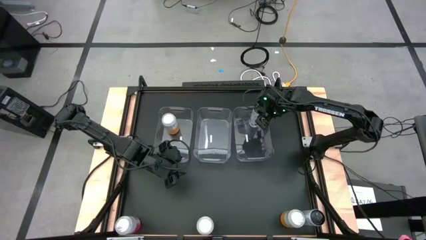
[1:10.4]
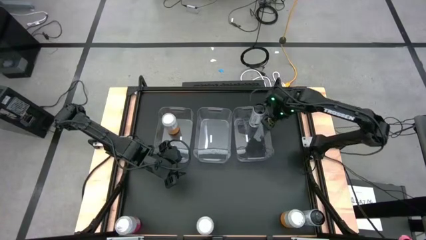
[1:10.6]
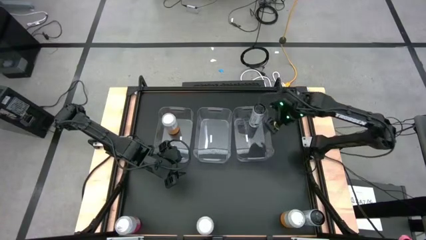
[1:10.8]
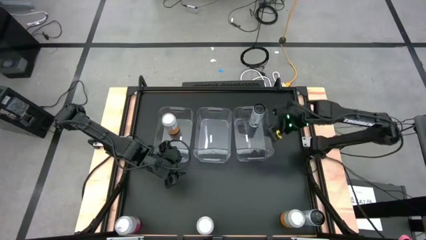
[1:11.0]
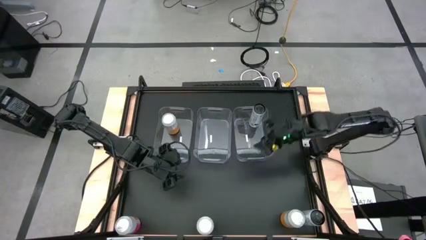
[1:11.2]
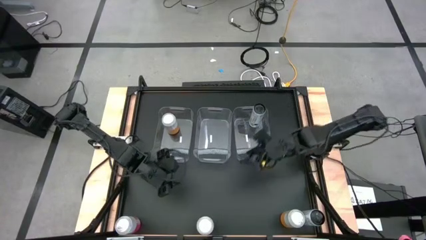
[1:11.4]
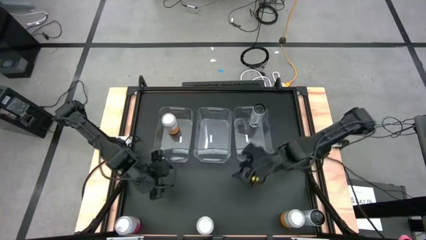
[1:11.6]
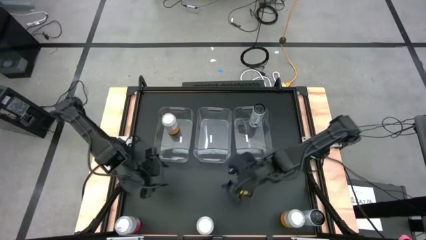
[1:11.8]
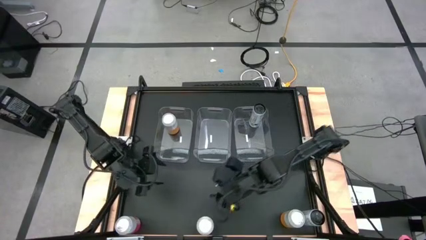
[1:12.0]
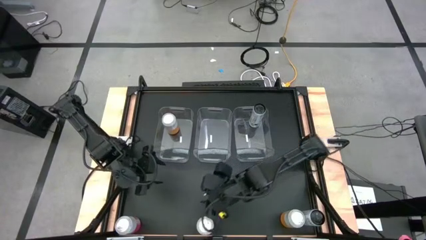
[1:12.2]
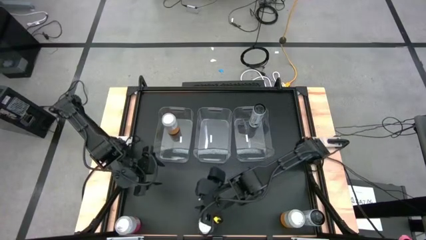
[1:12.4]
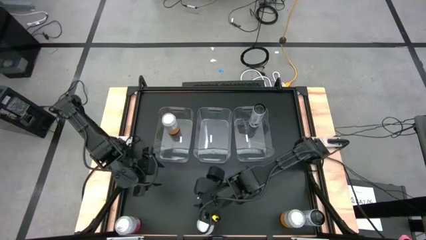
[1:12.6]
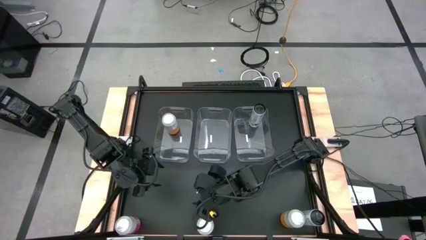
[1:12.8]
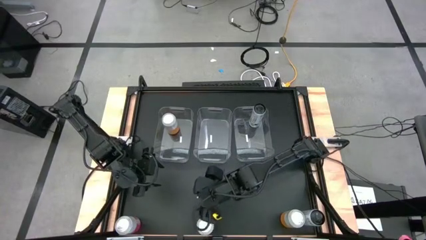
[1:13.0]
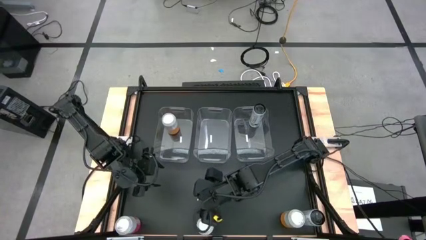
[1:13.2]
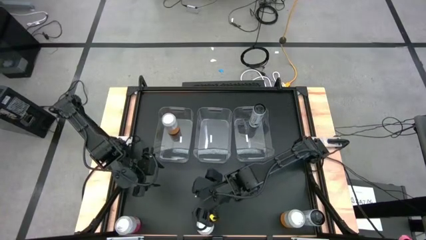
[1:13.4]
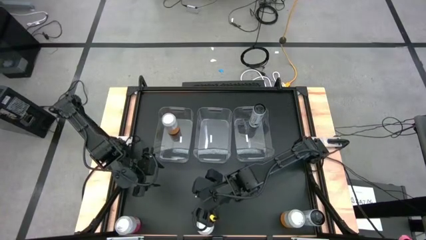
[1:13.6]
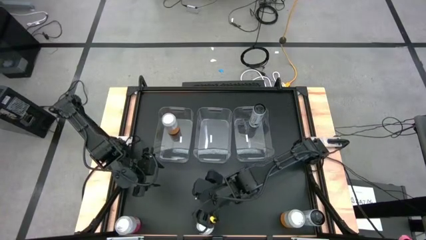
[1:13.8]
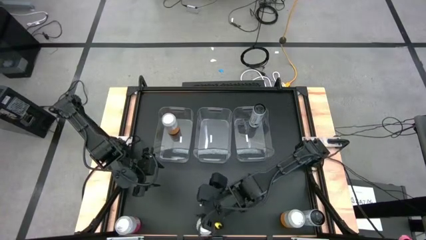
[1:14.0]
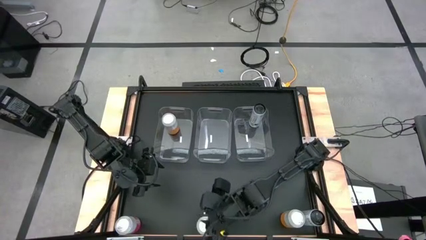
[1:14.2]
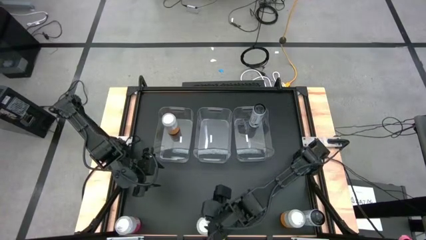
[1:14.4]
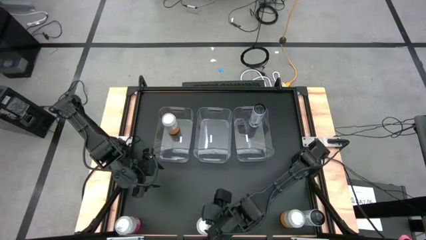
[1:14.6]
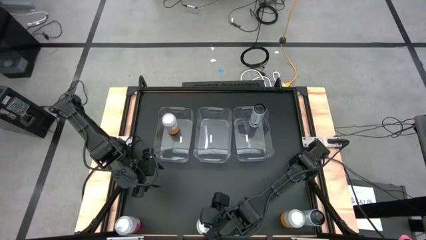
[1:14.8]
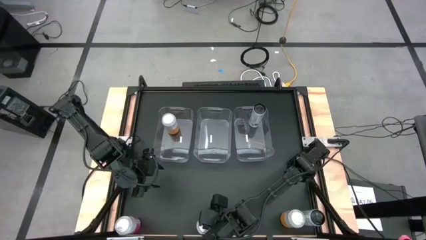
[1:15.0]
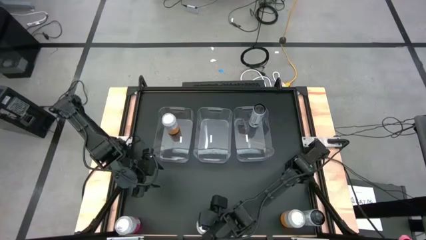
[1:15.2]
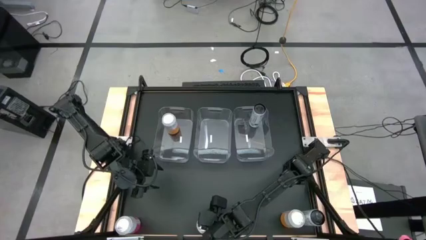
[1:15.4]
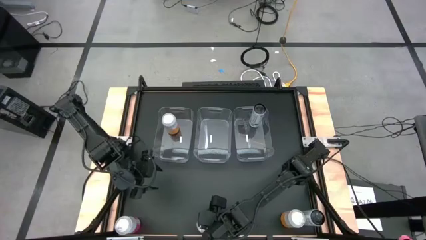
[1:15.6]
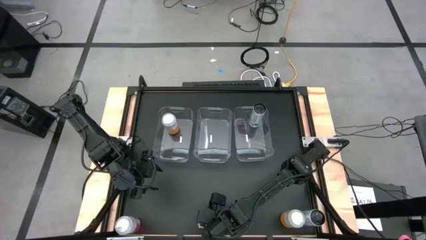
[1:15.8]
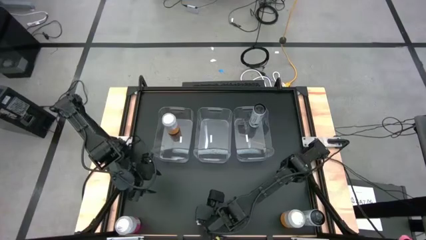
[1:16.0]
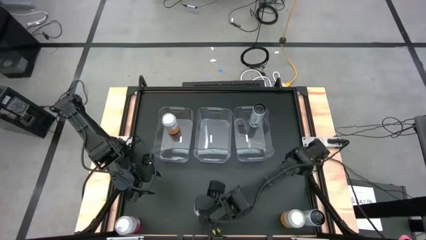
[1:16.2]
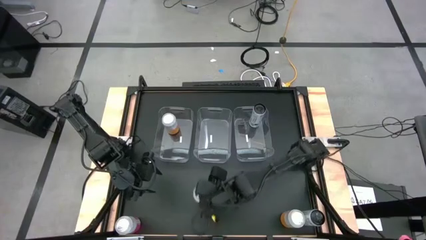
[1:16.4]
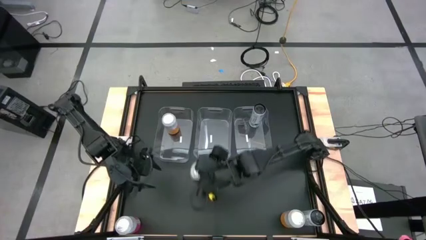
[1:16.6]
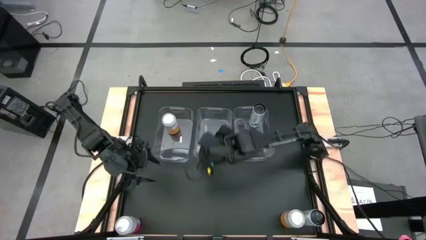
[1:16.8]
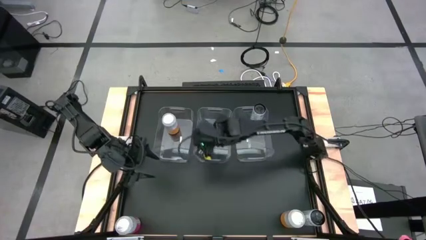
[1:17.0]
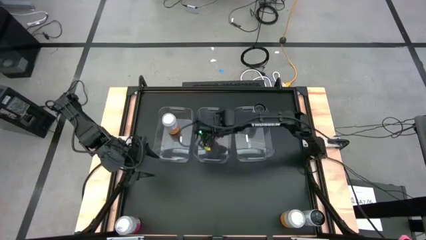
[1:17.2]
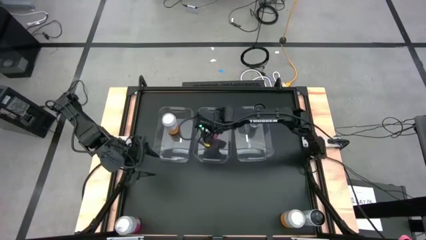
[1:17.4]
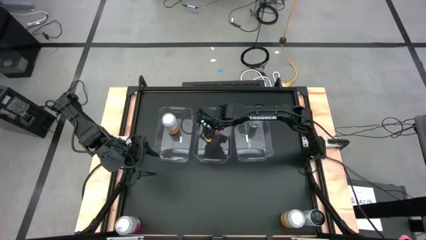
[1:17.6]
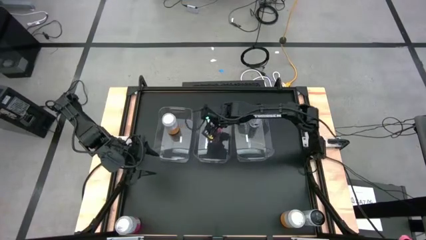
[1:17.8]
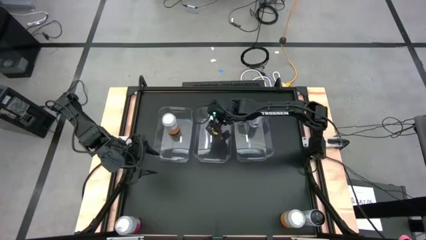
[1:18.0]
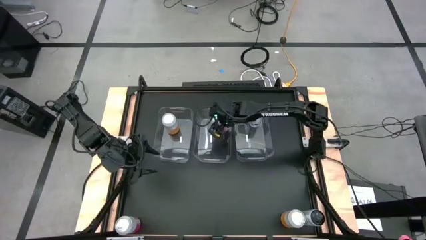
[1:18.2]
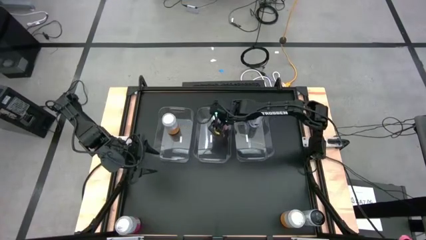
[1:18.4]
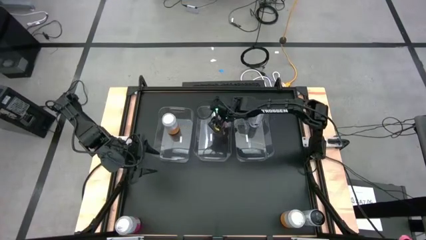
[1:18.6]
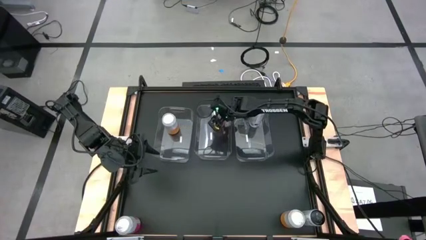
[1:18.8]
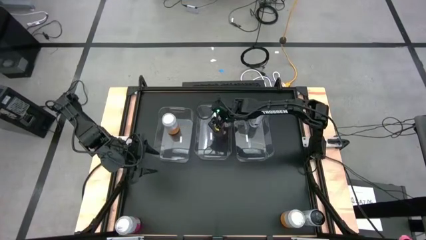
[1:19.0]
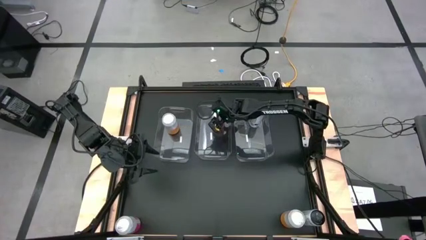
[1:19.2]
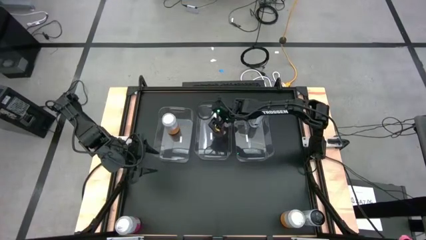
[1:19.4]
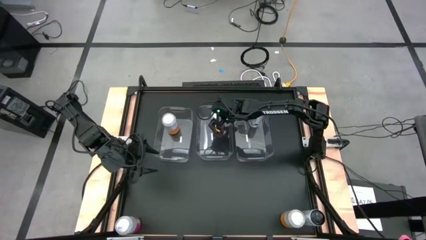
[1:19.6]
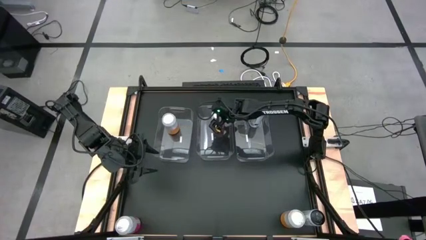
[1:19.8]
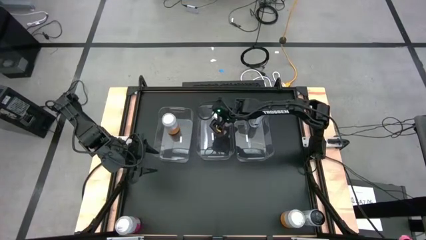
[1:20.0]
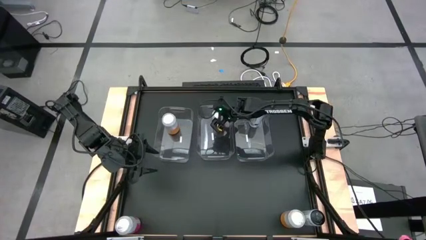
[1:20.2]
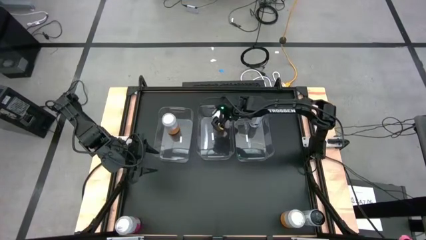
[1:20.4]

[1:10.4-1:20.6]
Task: Sort soda cans
Put the right pink-white soda can into the center transparent bin

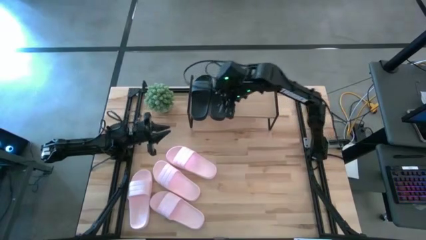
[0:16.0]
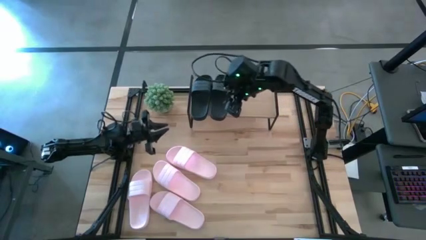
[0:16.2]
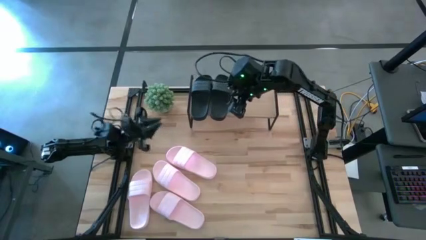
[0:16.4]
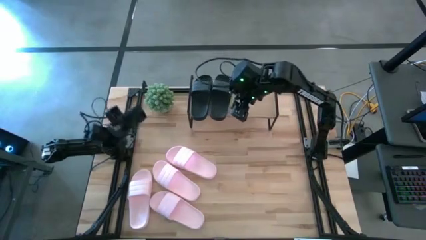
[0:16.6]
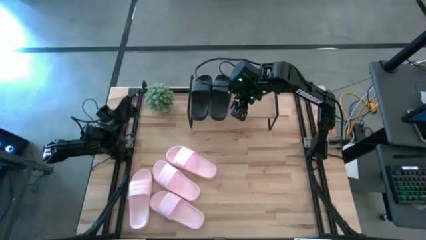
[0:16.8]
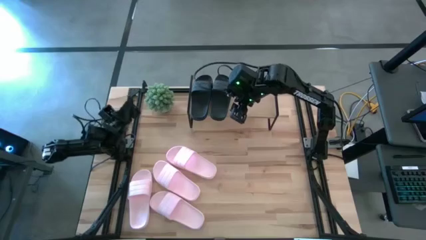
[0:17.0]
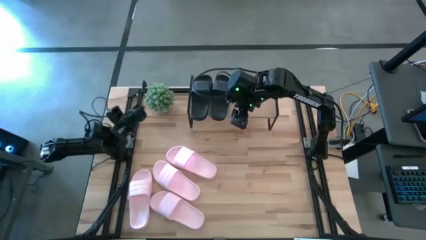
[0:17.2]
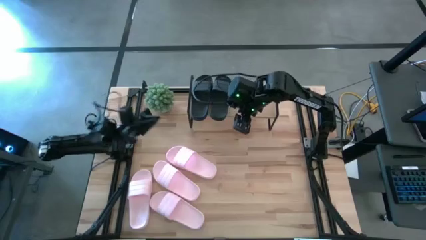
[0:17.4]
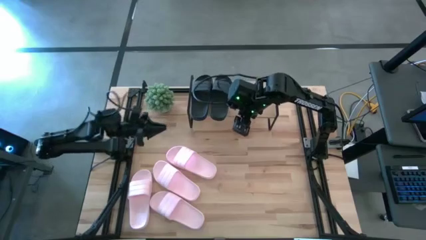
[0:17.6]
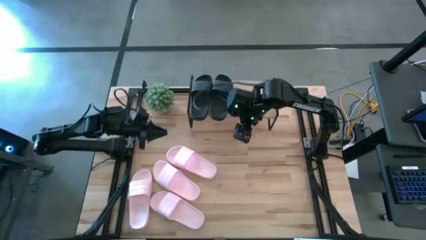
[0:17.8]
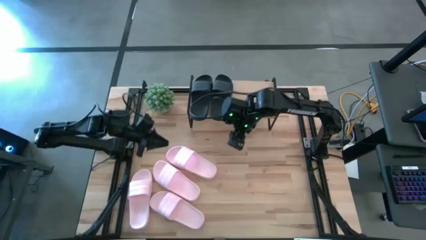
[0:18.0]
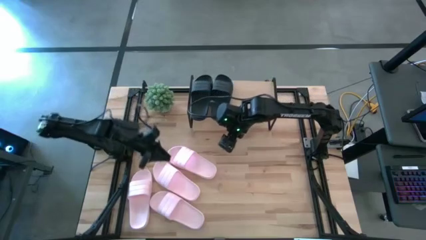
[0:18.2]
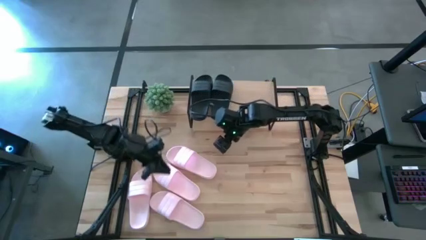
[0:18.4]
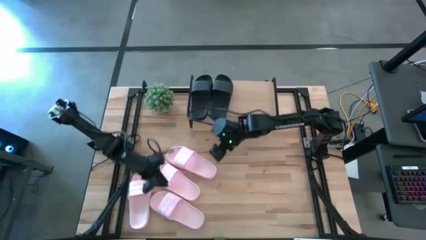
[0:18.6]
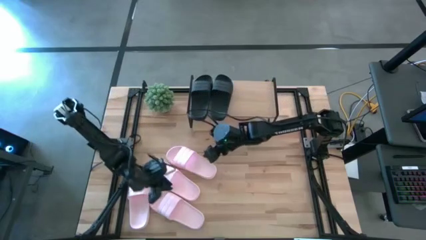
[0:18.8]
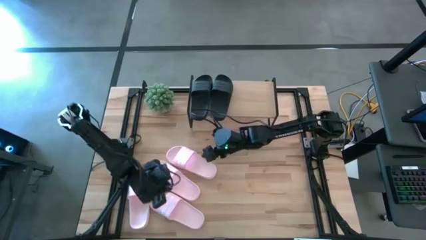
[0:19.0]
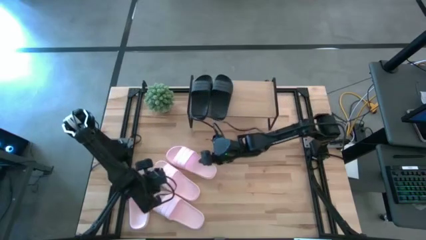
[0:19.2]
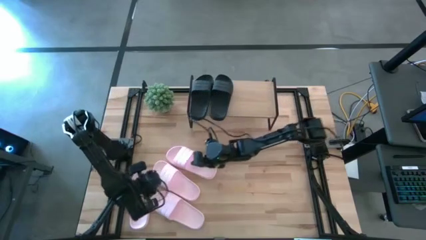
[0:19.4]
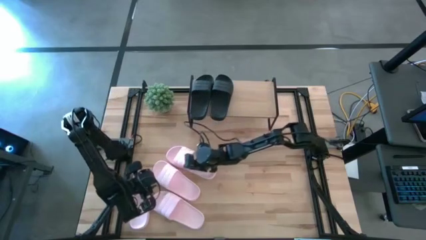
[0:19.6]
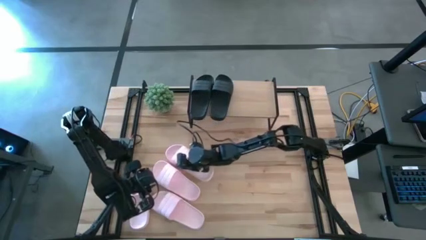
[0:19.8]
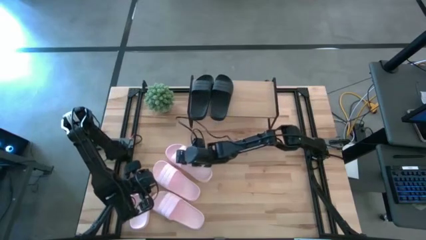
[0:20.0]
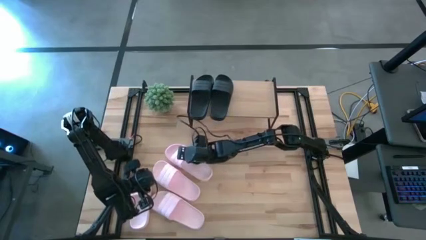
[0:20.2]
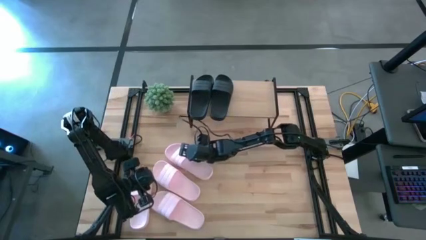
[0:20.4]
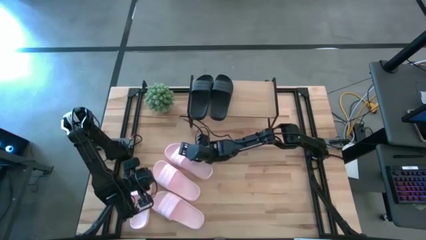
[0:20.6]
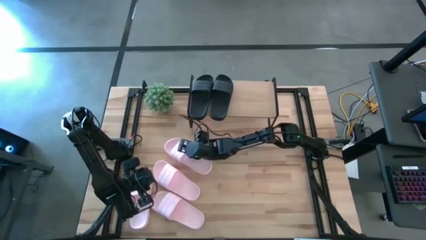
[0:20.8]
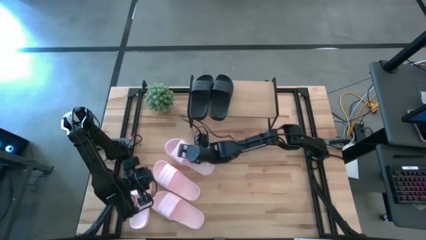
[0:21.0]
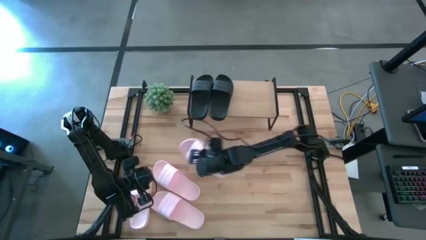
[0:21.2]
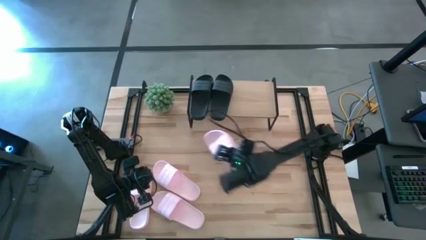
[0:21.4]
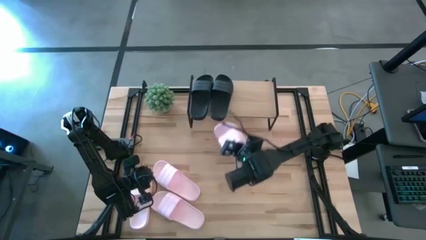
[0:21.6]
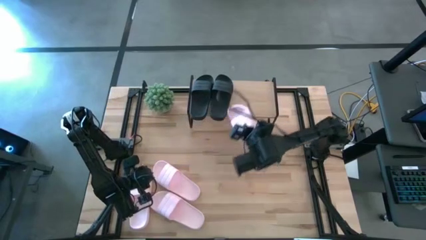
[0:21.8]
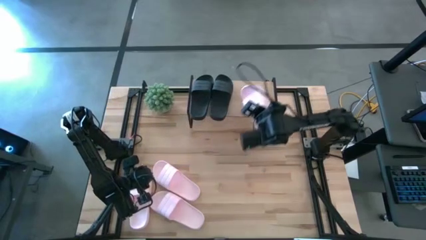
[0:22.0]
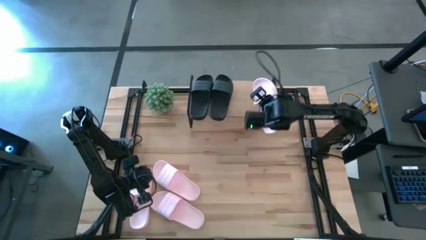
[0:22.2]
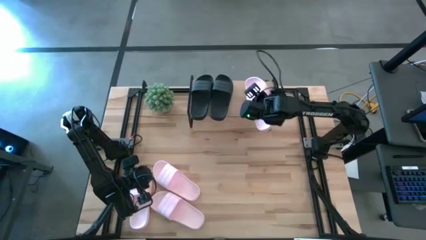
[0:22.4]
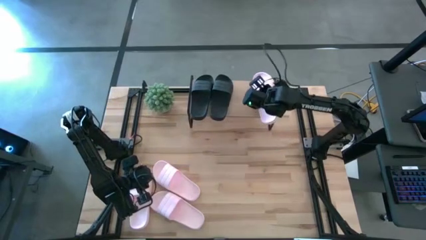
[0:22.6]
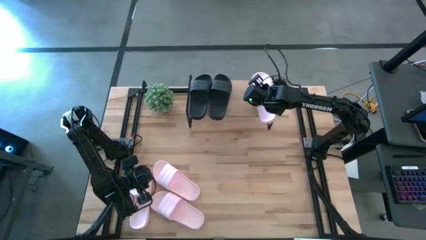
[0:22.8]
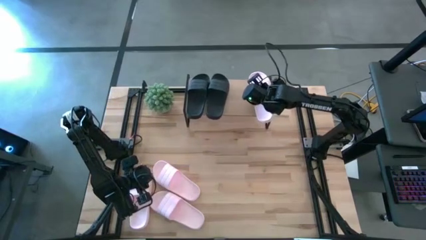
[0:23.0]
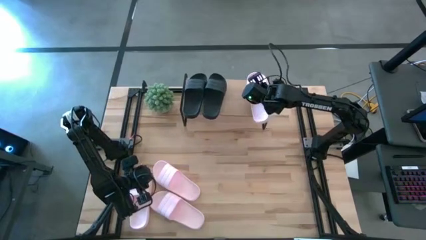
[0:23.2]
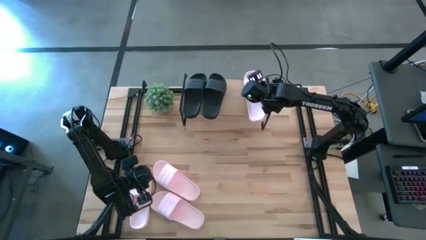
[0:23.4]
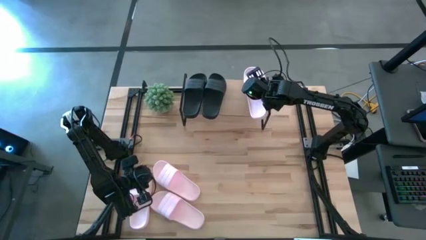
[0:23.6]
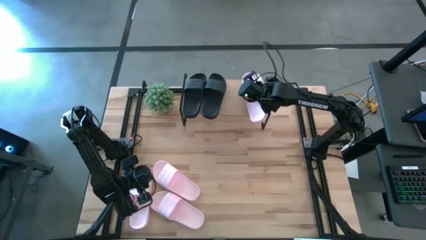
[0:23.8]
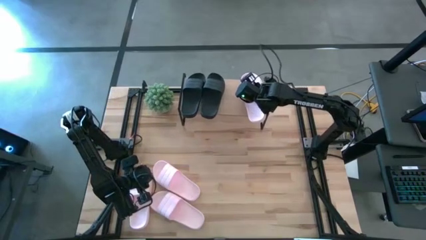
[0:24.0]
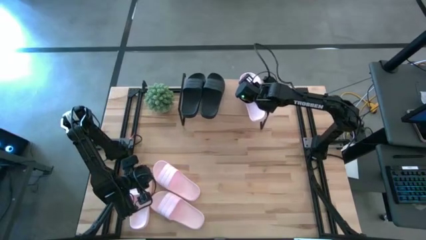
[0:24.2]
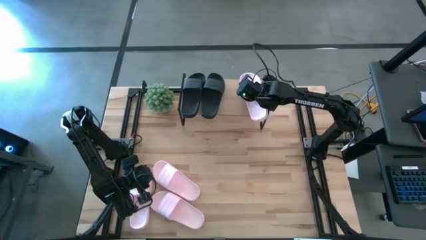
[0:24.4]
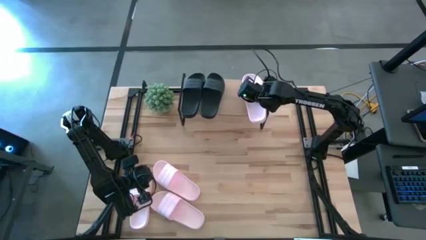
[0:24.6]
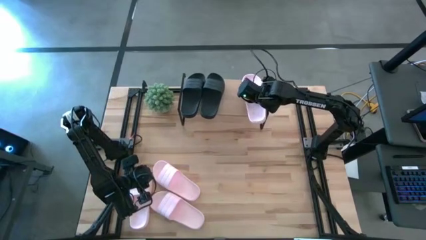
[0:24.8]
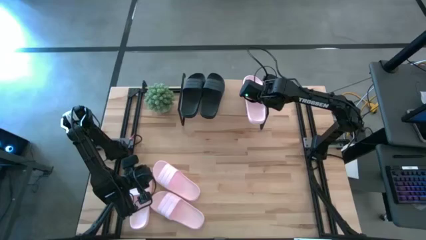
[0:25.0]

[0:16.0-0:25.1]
Task: Pick and place slides into the shelf
Put the pink slipper on the shelf
